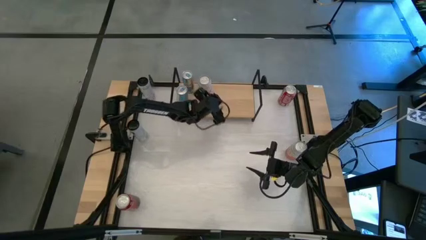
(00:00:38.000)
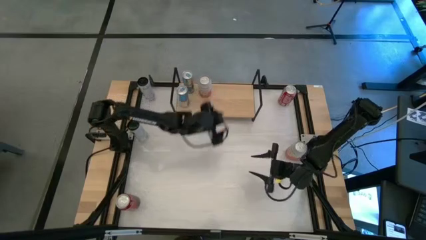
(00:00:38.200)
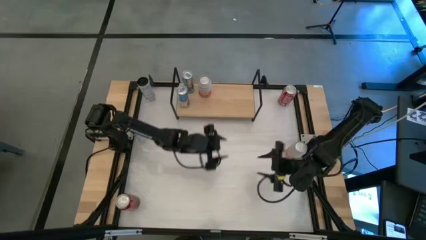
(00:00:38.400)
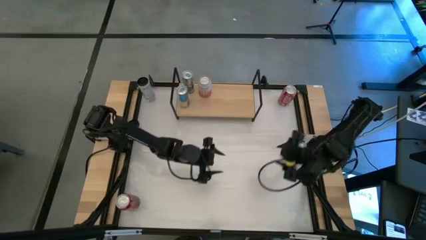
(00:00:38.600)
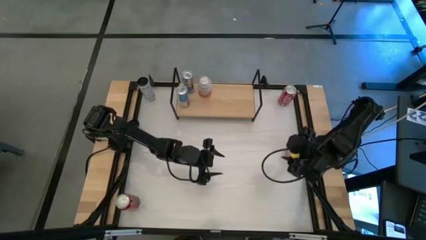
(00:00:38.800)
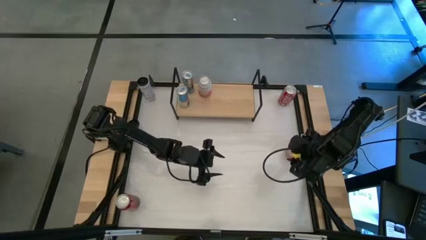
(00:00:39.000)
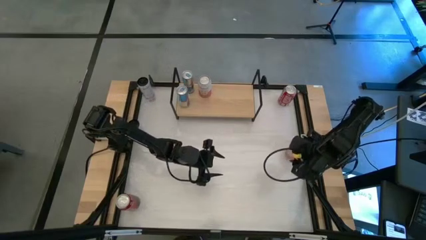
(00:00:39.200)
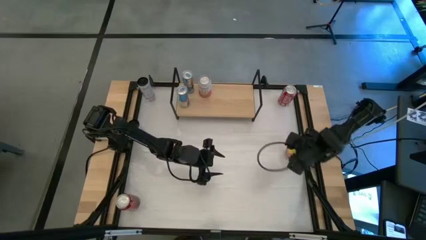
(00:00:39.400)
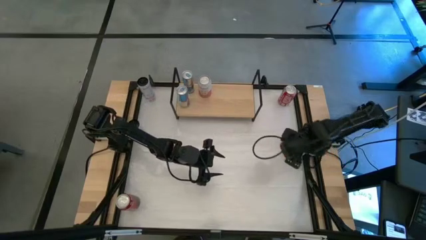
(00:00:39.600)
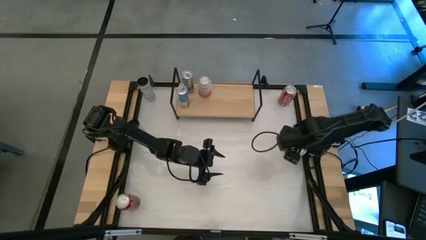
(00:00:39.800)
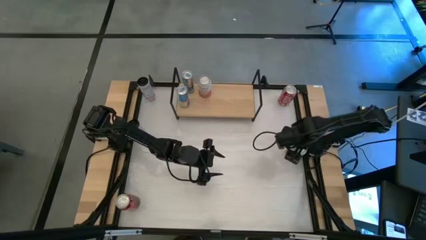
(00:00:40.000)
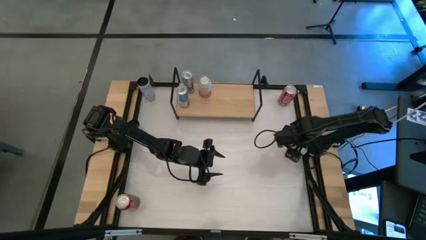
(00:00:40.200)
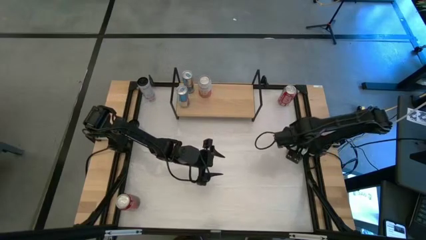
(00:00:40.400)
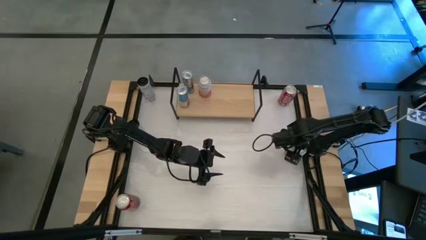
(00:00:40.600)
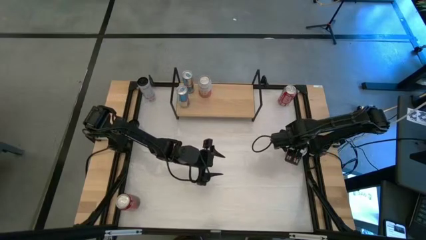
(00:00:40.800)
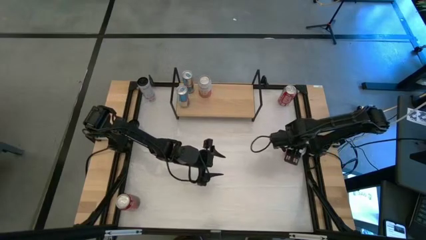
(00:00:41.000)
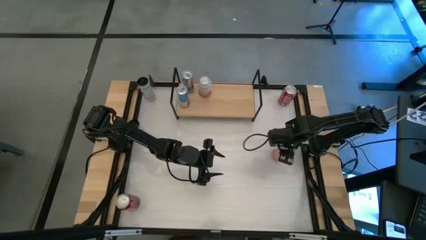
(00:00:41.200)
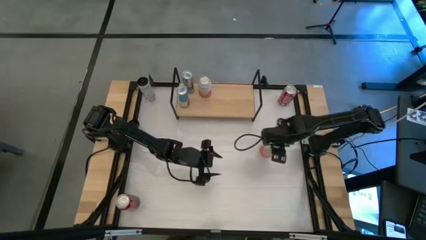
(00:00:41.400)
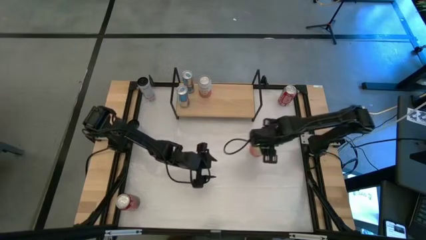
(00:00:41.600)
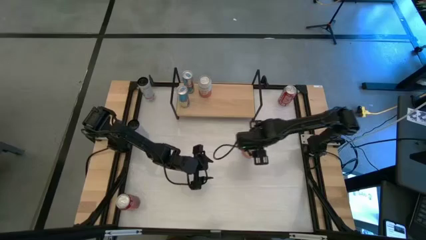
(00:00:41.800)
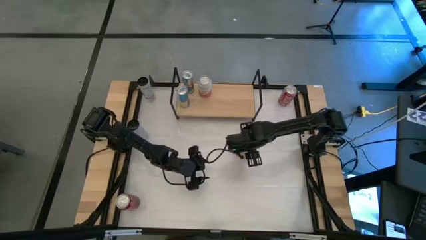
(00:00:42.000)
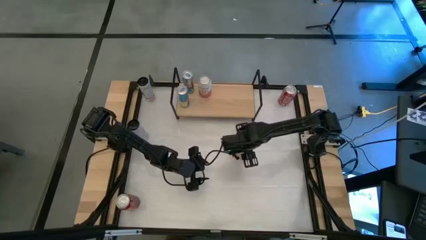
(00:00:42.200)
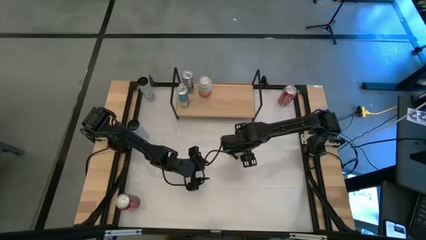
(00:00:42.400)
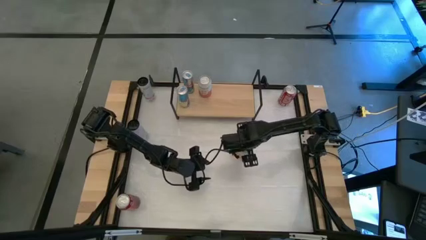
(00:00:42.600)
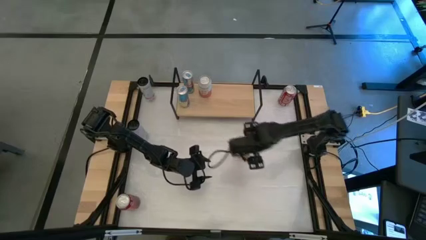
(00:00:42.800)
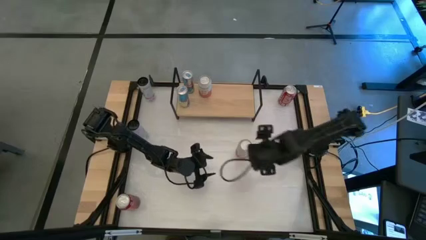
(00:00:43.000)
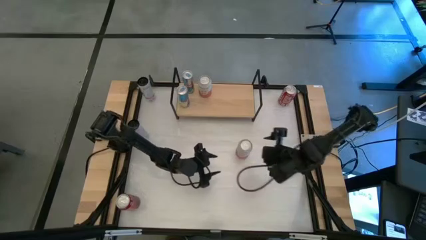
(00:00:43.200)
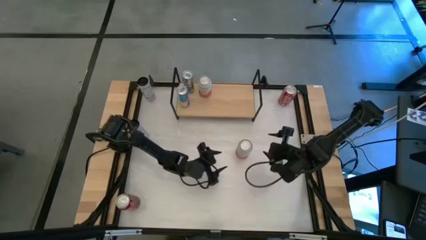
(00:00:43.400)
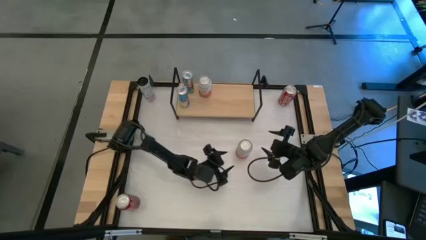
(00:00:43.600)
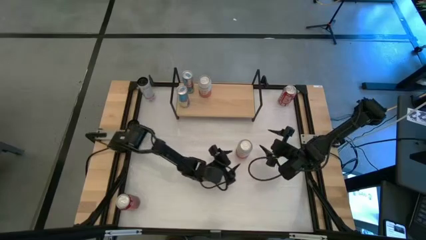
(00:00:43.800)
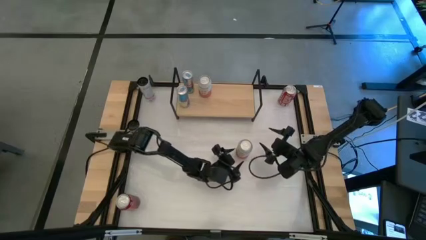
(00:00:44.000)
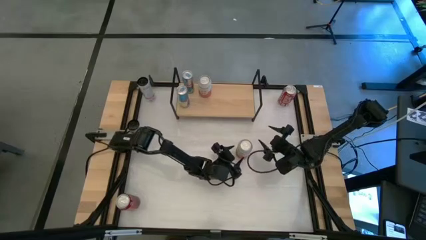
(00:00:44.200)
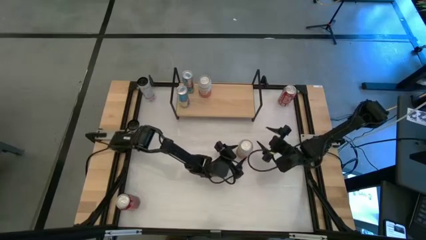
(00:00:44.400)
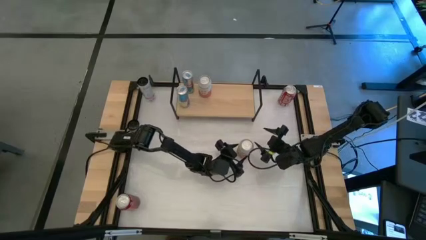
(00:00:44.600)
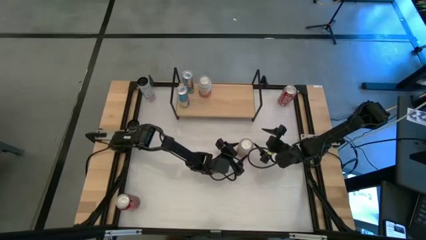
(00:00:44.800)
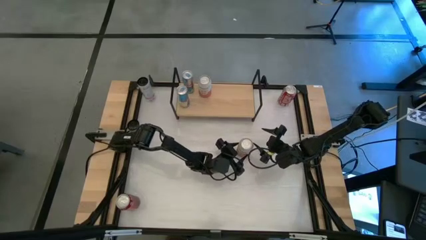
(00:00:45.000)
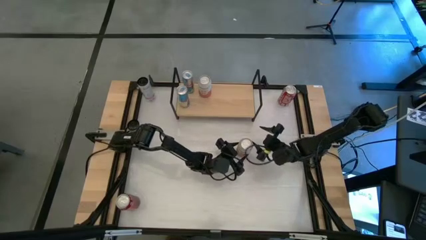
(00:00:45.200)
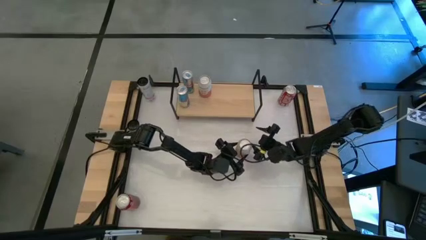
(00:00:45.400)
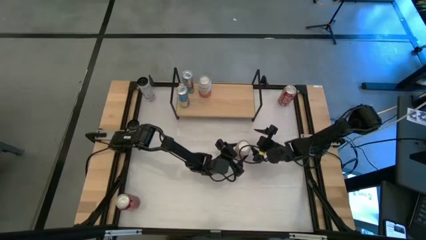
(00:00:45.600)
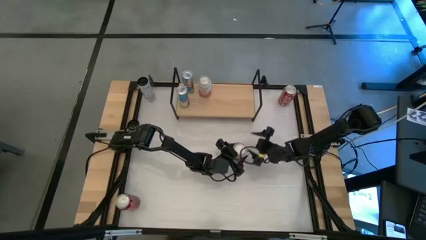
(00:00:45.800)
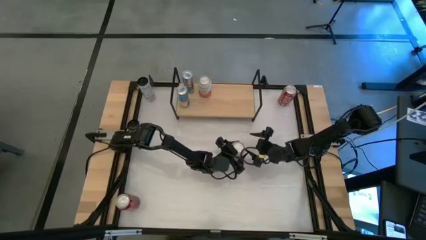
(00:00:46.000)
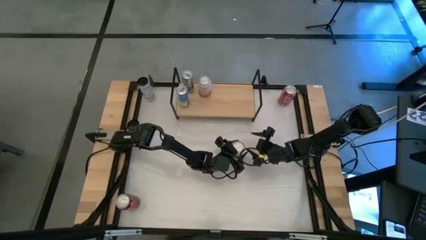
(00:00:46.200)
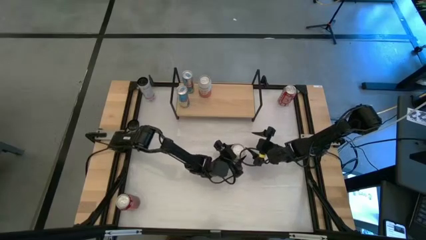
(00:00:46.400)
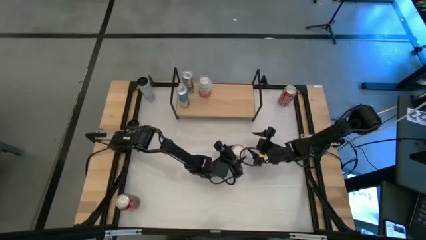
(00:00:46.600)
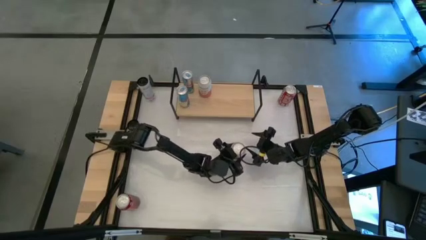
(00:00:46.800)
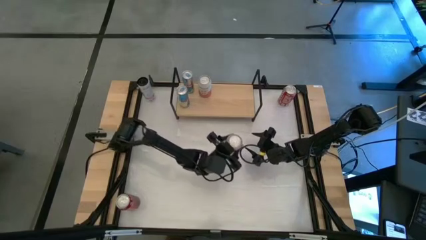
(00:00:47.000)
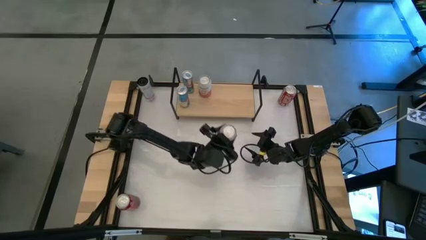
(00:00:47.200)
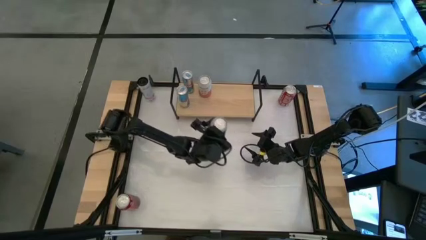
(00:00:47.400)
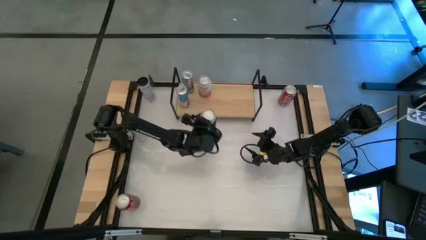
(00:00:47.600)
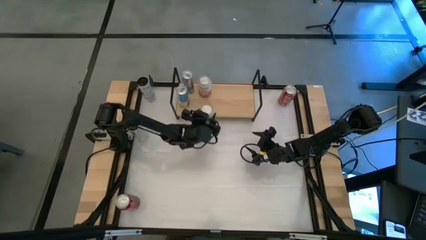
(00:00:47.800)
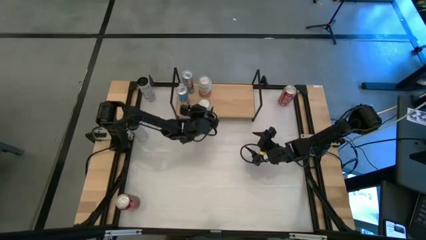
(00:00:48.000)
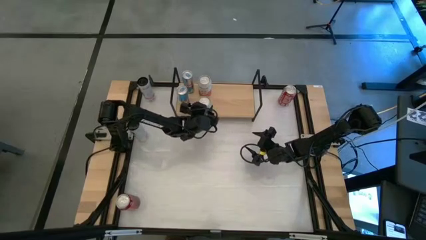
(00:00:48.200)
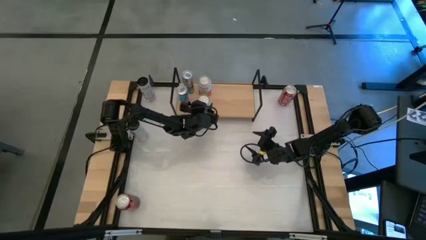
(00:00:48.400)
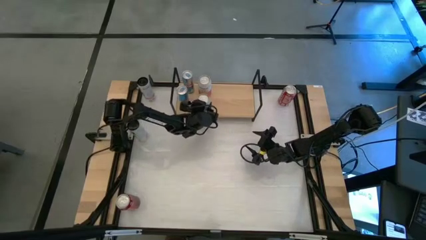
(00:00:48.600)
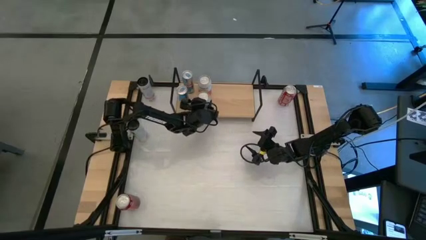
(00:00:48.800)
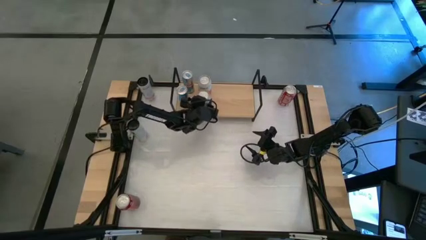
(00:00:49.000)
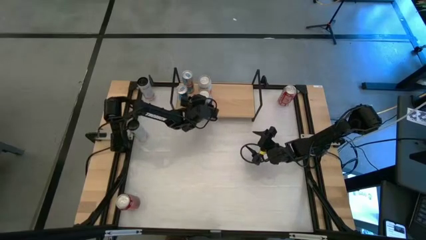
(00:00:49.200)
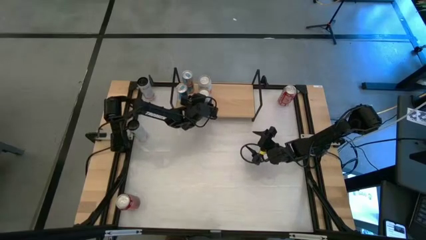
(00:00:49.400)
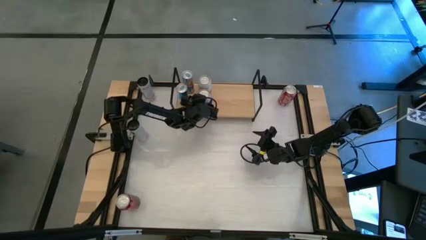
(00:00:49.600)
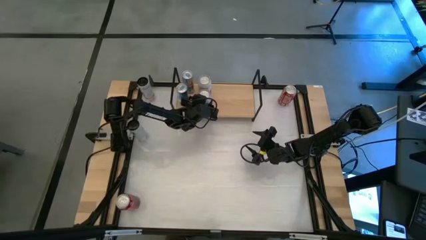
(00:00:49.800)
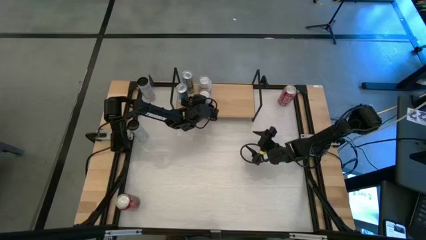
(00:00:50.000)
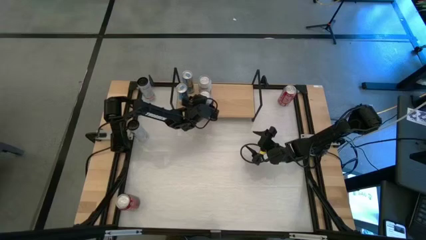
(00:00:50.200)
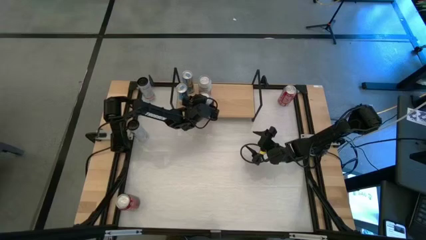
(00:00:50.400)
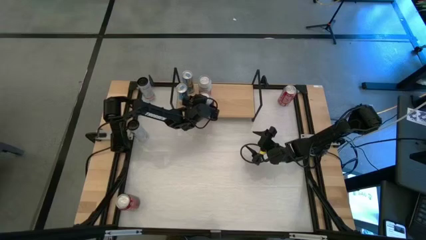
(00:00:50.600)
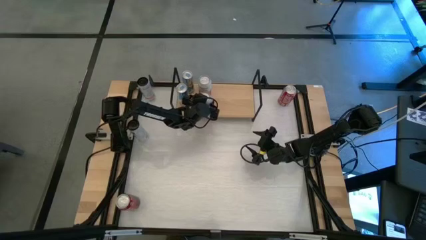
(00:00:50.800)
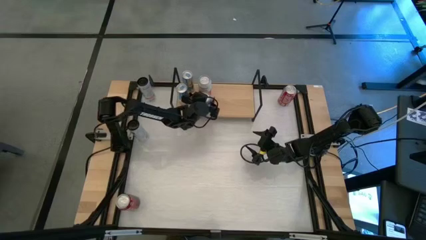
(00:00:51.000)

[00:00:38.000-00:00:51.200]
Task: Place canned beverage on shelf
Put the pink and white soda can aligned with the other pink and white soda can on the shelf
